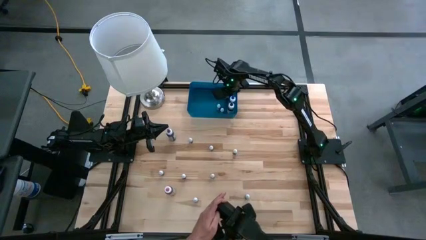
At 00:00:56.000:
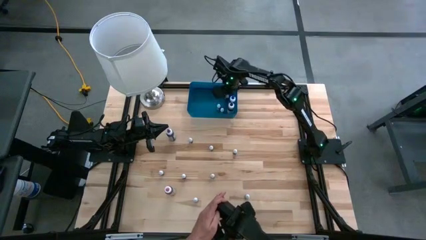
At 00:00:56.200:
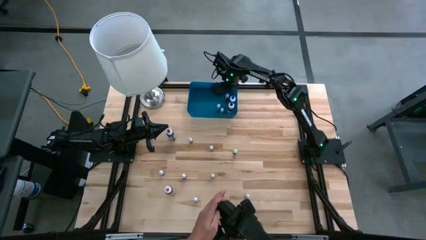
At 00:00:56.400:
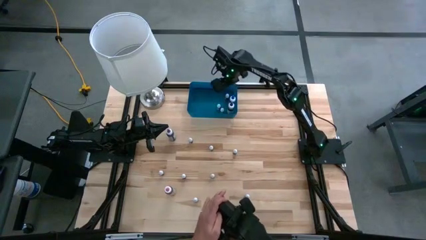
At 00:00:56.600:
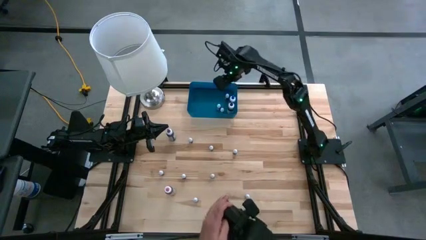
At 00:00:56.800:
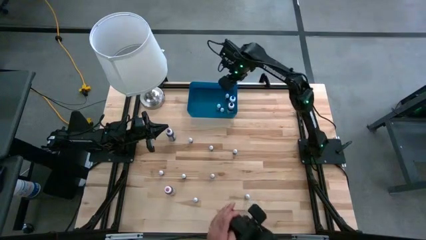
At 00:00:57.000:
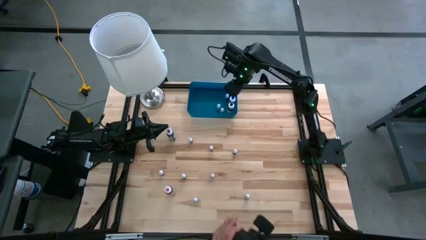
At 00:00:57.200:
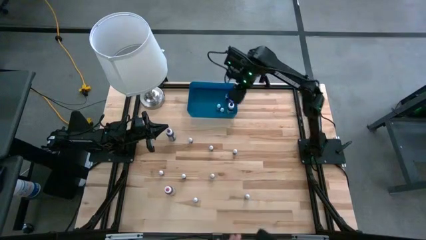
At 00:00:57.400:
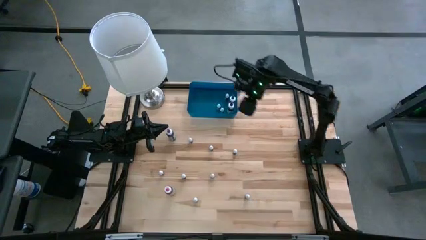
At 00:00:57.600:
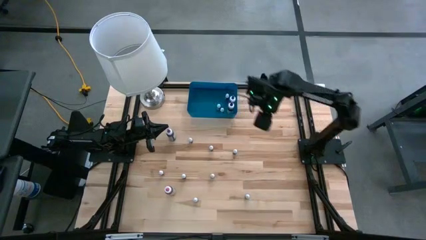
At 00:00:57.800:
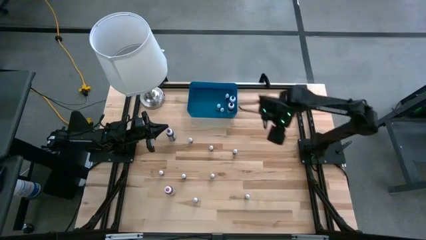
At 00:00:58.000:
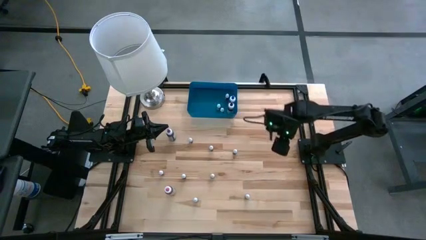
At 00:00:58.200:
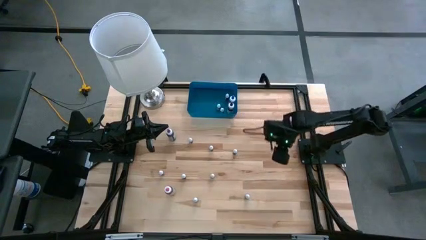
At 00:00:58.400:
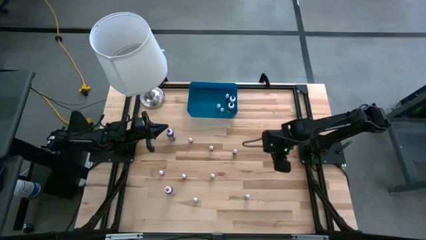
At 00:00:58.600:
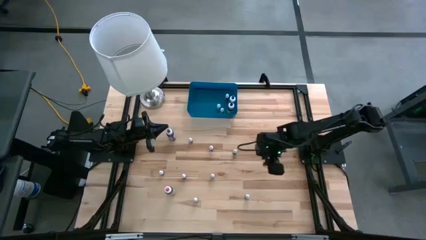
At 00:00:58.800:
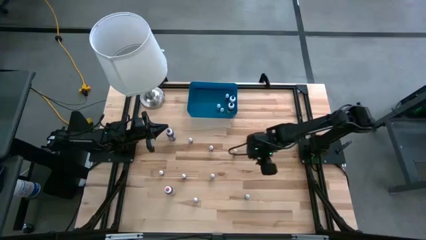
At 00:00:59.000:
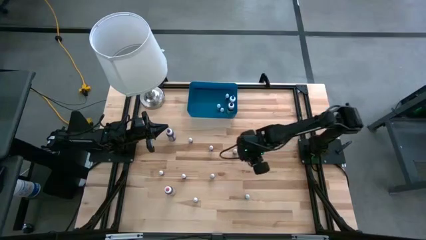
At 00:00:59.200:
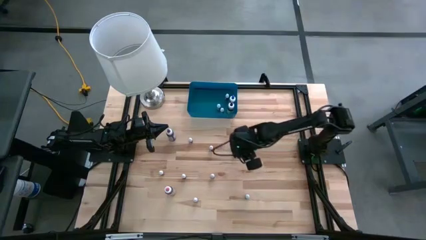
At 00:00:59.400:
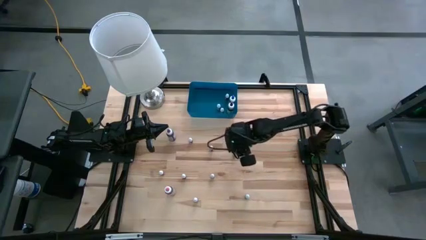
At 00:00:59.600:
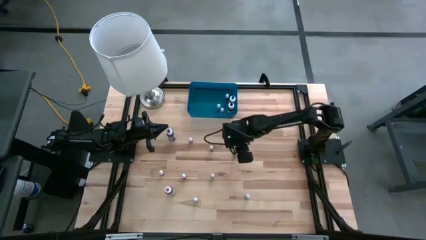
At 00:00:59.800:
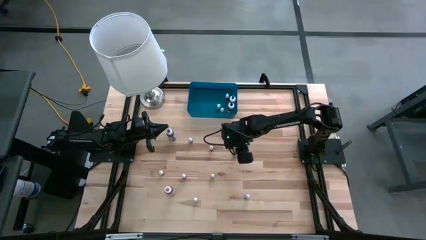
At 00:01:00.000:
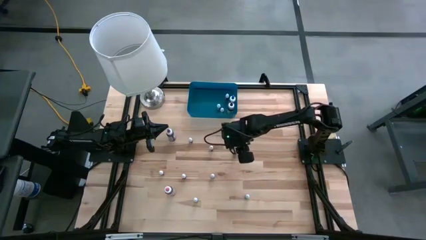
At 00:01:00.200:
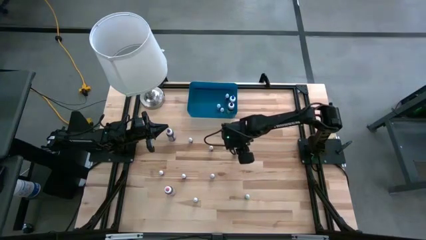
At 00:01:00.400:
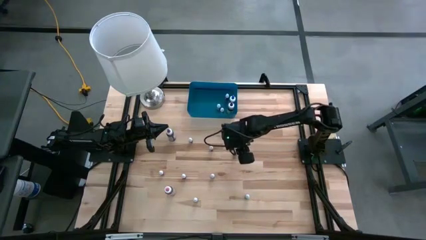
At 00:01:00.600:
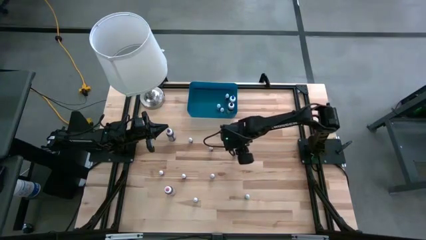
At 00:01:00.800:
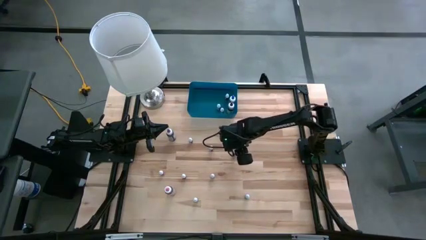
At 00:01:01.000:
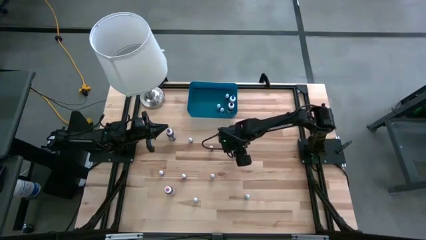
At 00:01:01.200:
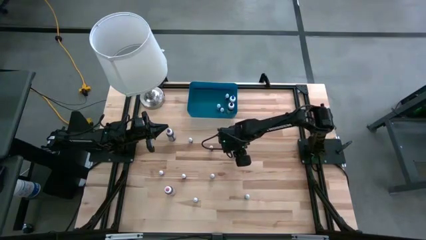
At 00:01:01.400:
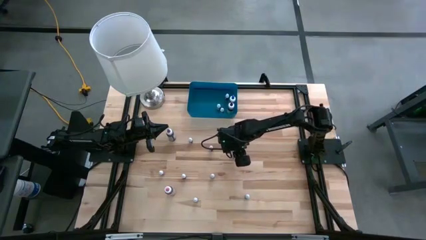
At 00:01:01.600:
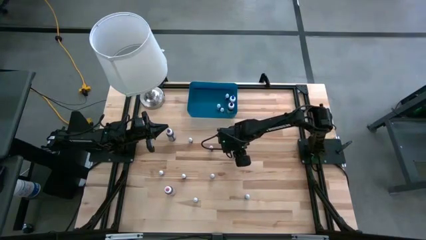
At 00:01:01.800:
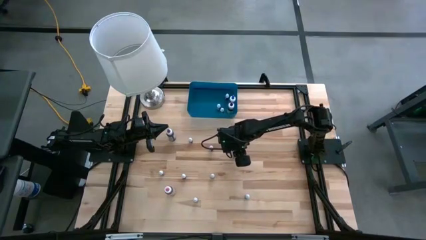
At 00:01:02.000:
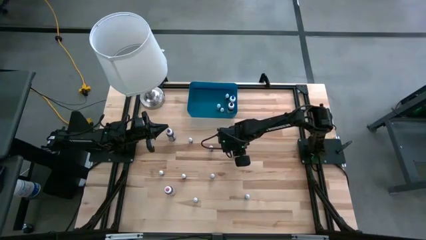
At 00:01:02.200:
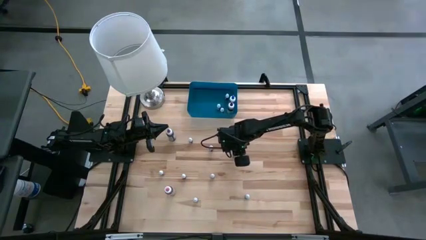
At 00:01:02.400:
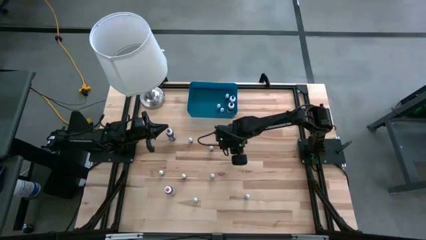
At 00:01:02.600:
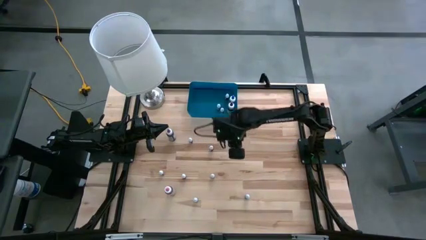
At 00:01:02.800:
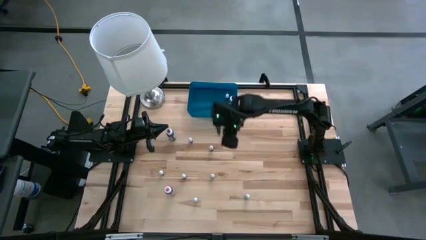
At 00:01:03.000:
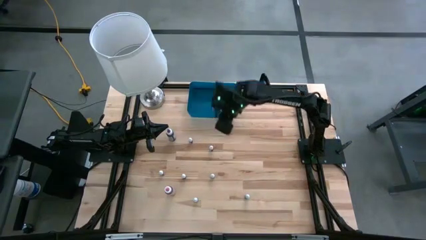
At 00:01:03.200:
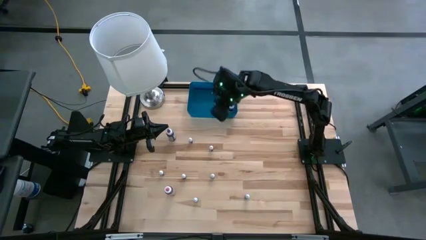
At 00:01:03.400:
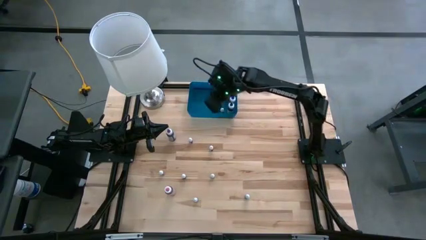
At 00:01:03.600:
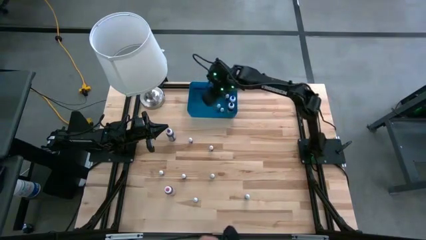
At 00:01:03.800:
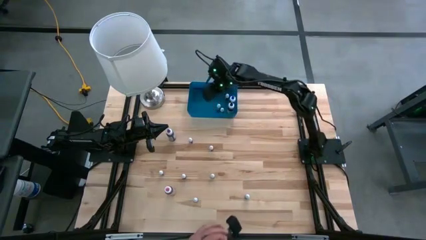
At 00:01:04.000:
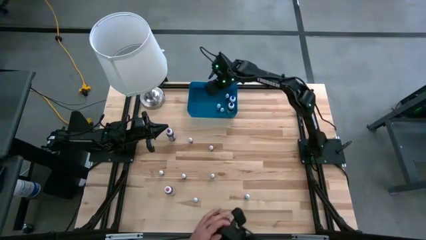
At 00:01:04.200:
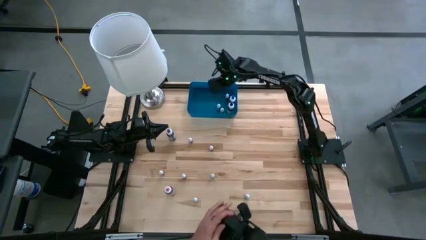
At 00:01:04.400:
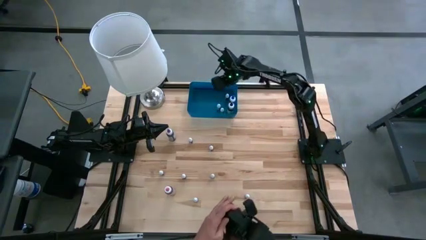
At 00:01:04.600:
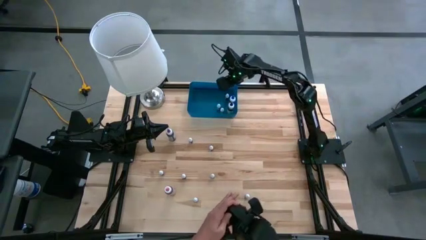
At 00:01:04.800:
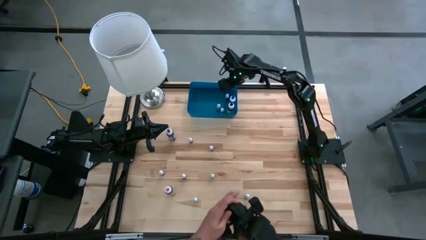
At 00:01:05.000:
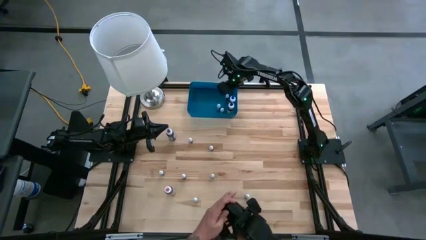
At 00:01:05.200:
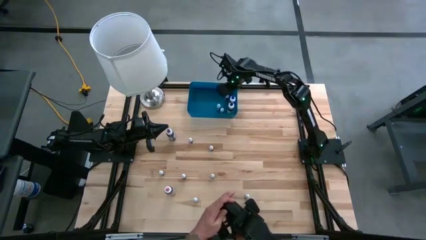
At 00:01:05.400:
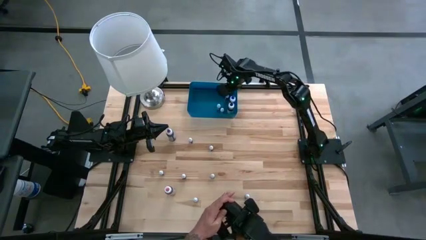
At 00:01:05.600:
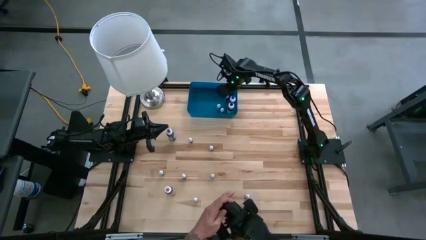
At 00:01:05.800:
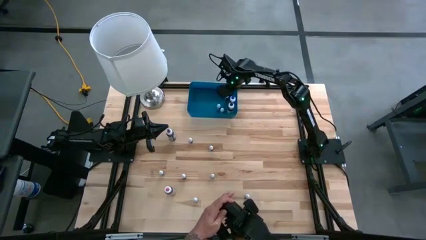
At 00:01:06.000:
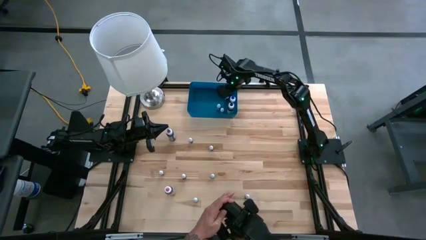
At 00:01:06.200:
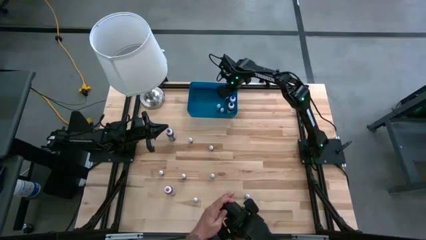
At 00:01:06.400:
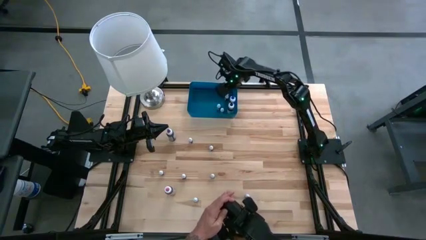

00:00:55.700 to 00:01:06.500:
Task: Pick & Place food coloring
Put the small black food coloring bottle into the blue bin

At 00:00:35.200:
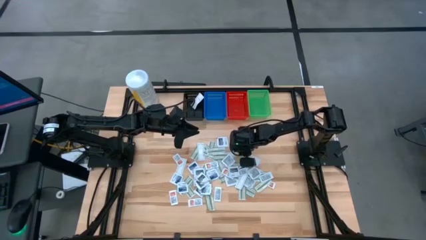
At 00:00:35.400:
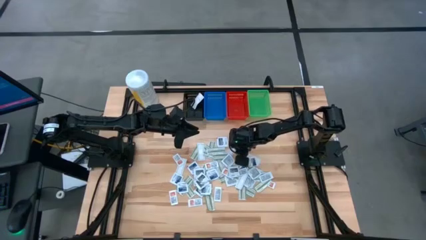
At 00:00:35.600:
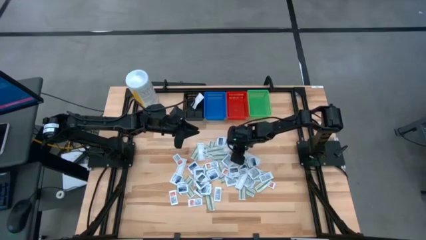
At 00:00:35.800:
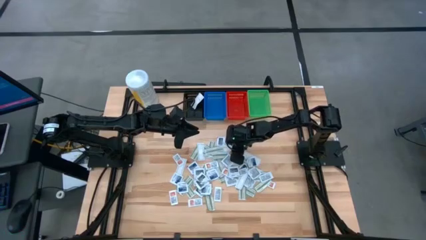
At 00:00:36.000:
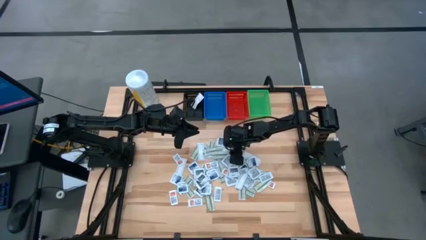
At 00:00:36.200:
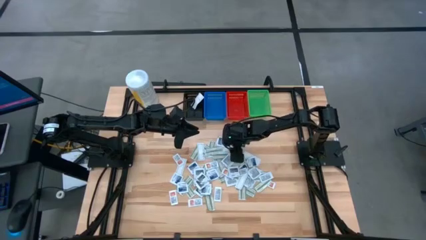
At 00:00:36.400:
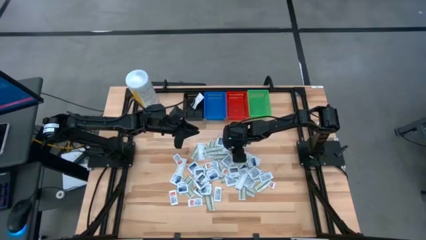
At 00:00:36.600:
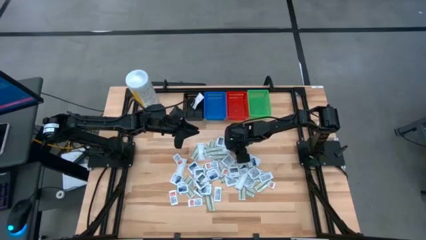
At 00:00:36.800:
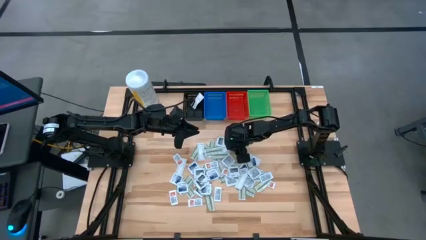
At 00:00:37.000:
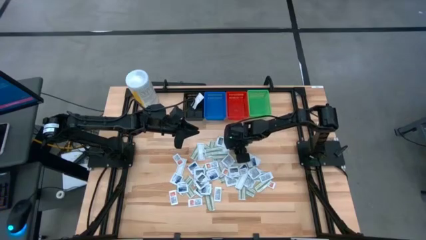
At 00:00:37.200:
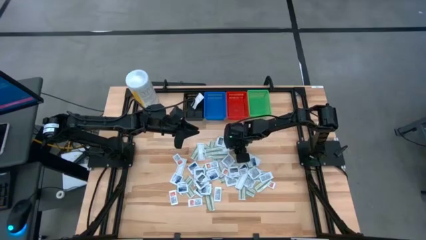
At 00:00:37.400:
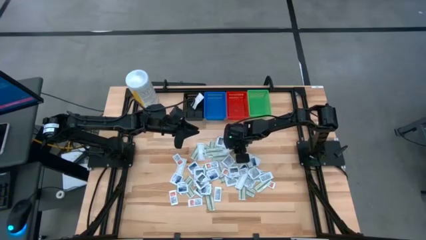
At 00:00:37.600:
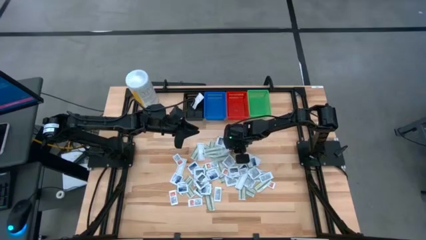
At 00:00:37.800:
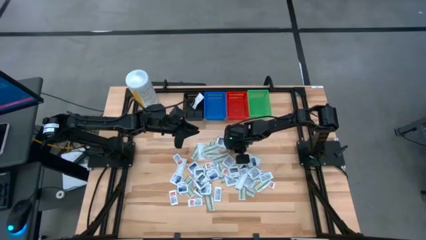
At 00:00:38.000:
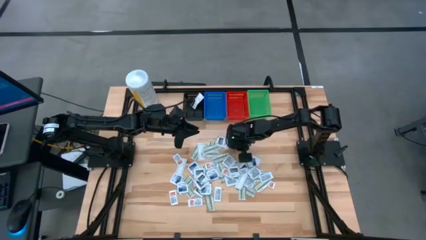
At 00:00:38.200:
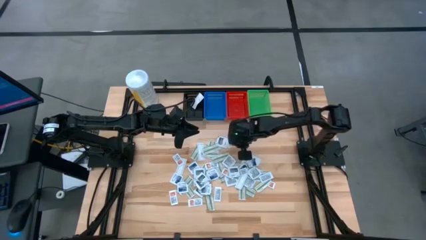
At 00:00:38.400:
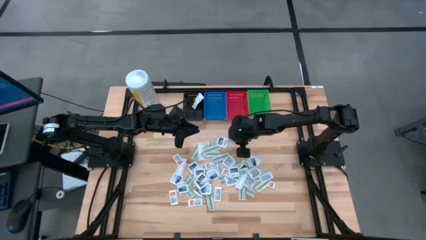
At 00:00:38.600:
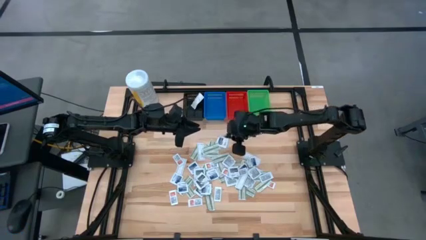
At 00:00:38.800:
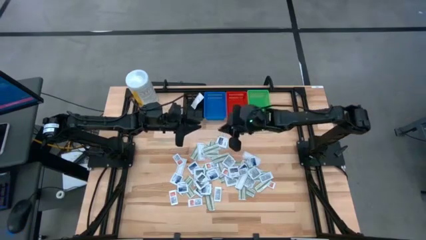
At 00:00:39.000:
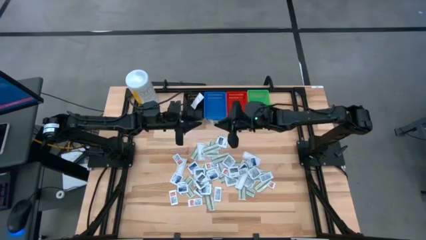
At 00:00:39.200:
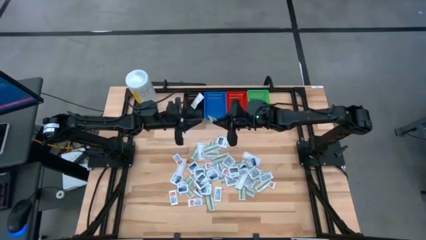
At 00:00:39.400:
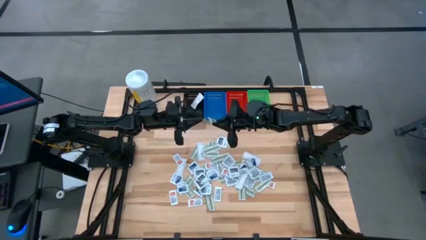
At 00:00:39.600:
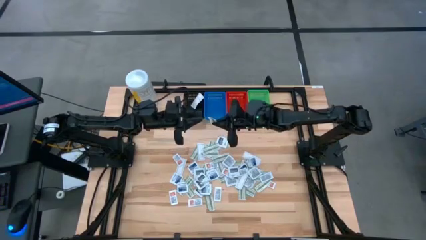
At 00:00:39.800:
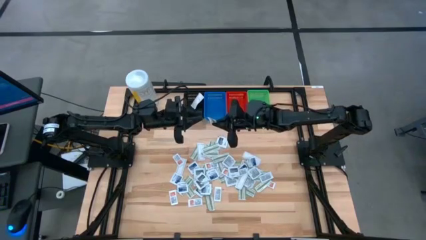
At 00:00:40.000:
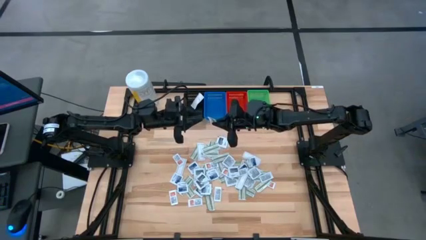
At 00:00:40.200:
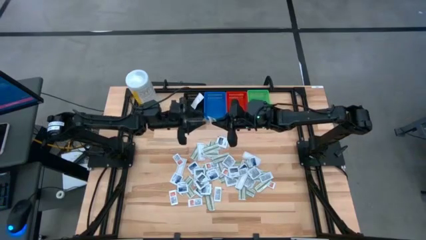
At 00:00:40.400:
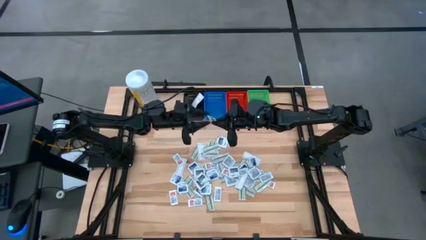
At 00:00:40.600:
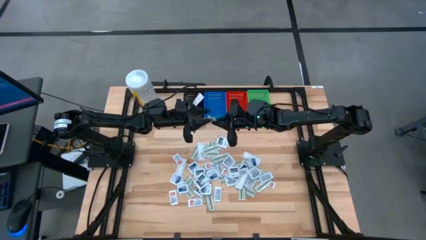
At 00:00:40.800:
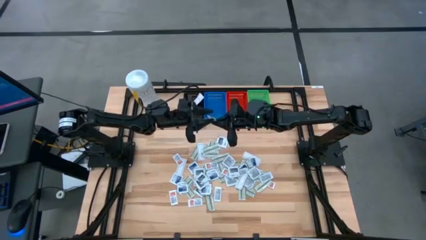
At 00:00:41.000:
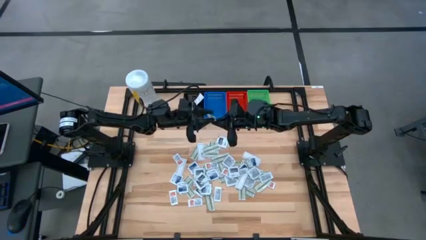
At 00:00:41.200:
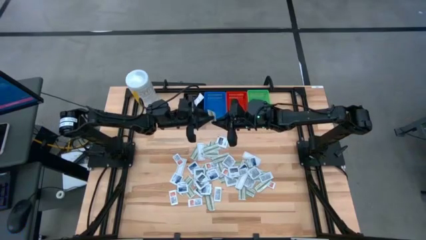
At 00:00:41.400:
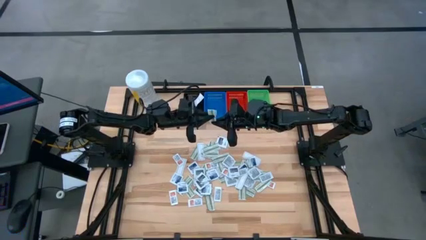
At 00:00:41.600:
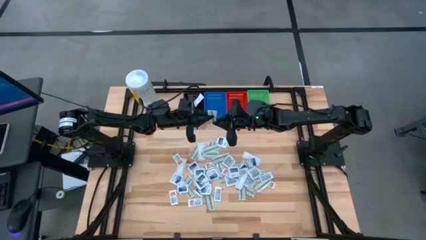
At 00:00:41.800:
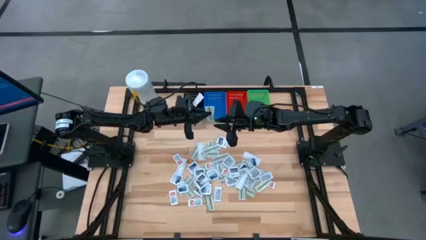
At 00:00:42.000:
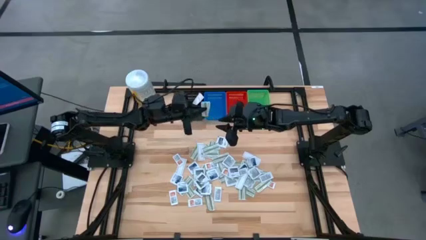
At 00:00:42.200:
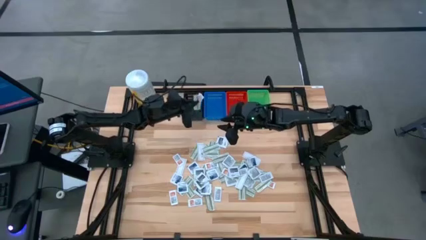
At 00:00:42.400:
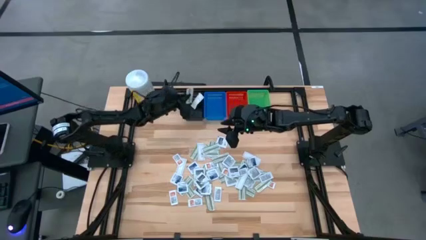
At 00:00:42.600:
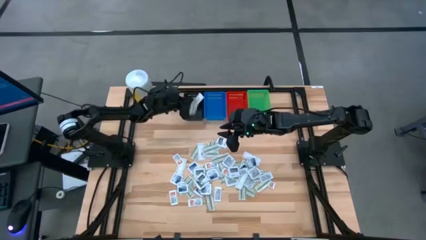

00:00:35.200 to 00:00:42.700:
Task: Pick & Place First Aid Supplies
Put the green bandage pack in the black bin
